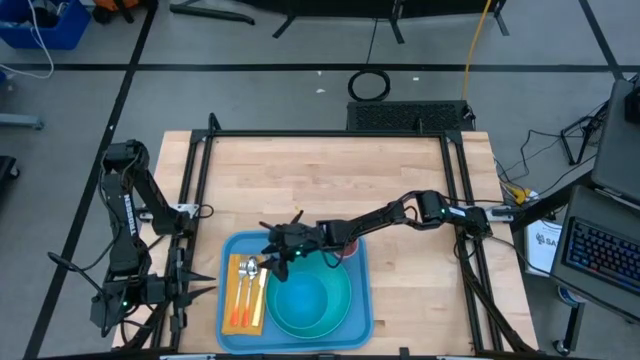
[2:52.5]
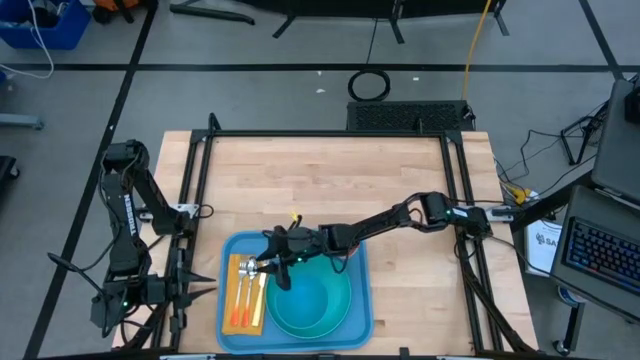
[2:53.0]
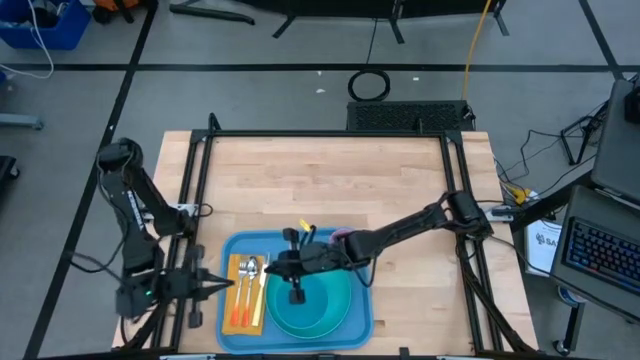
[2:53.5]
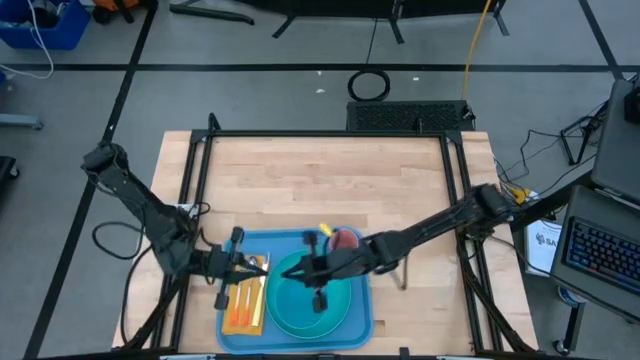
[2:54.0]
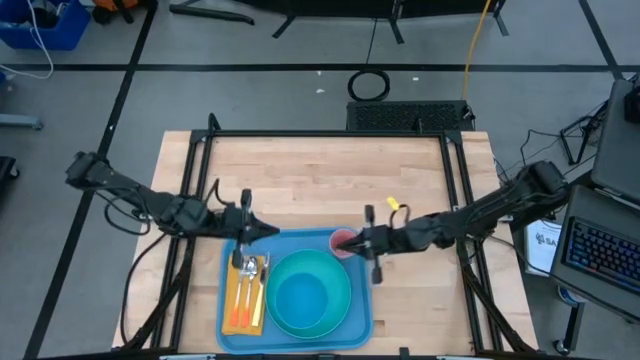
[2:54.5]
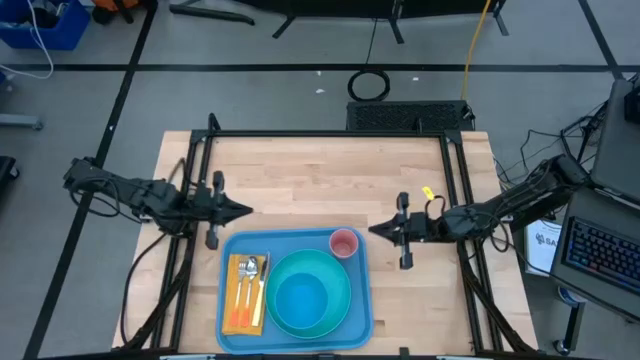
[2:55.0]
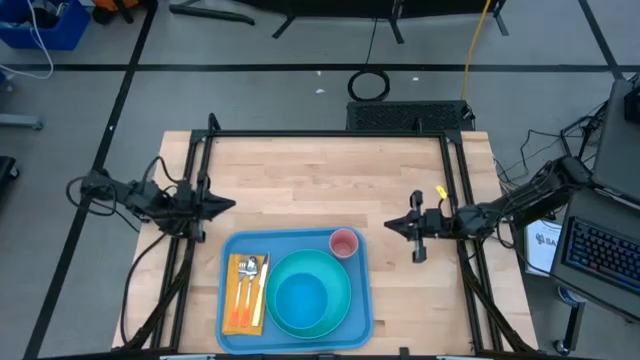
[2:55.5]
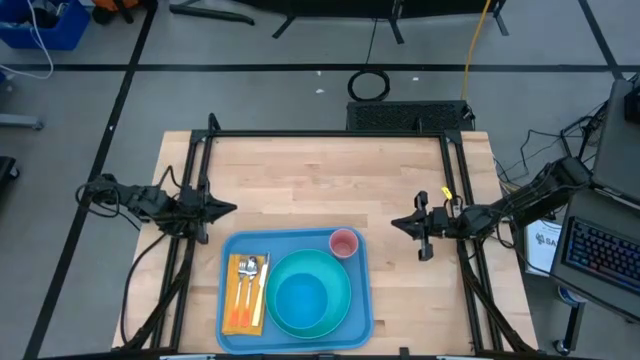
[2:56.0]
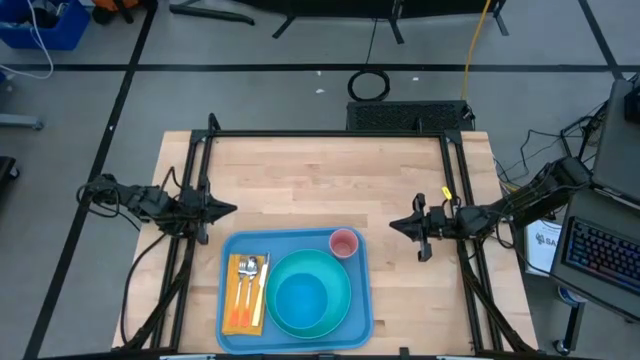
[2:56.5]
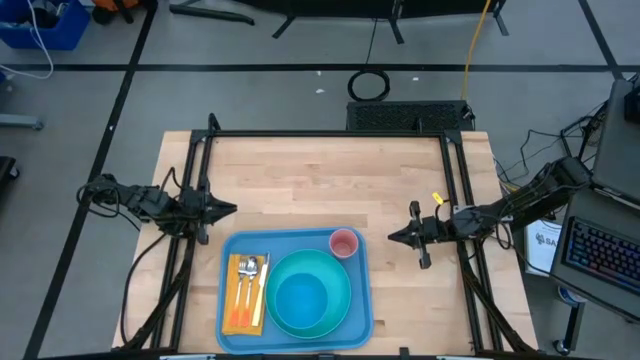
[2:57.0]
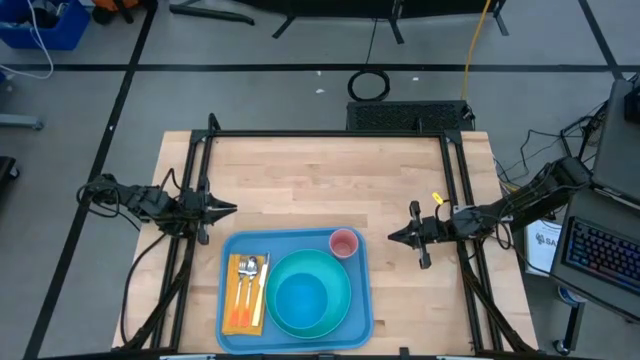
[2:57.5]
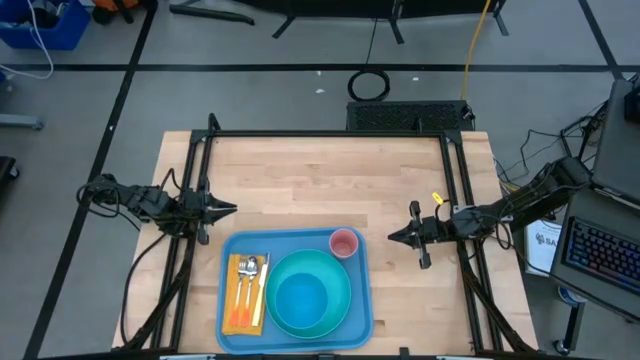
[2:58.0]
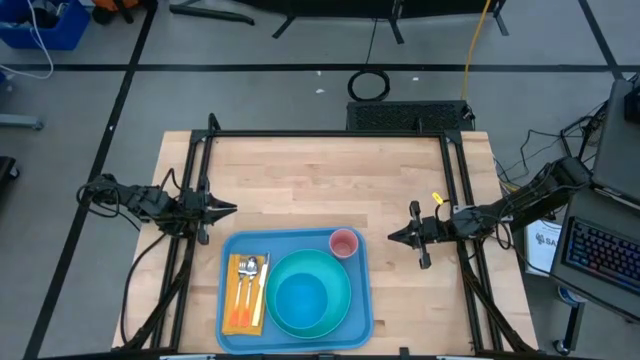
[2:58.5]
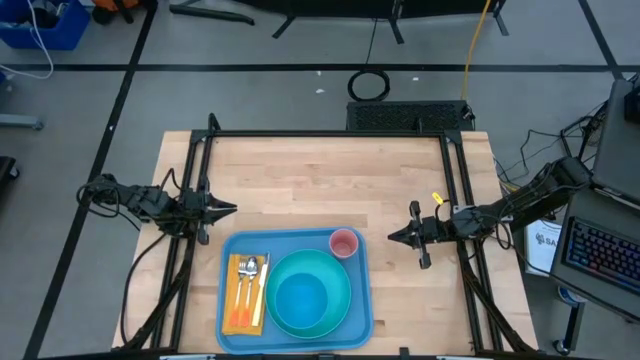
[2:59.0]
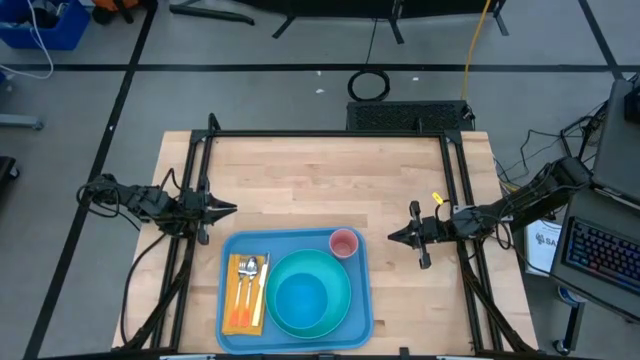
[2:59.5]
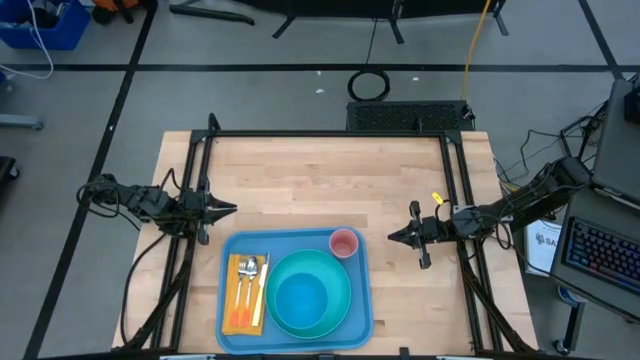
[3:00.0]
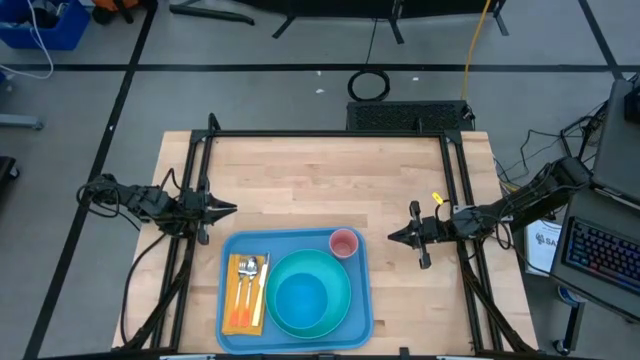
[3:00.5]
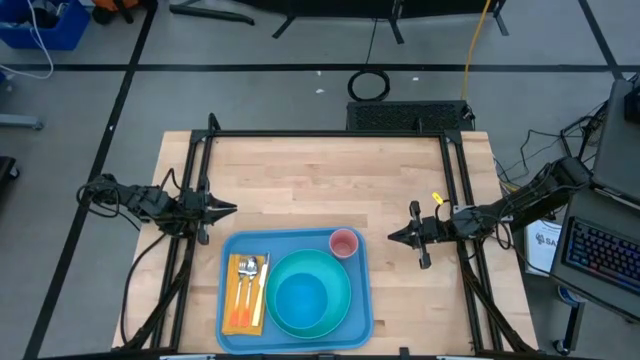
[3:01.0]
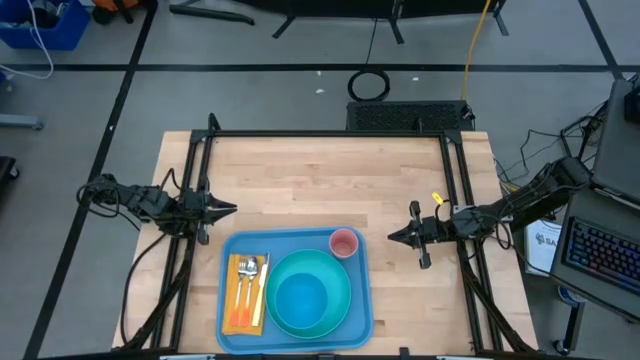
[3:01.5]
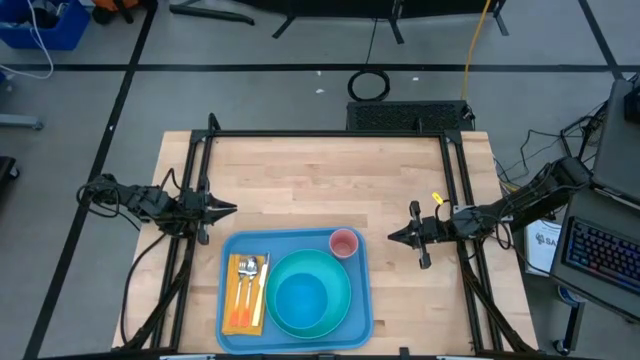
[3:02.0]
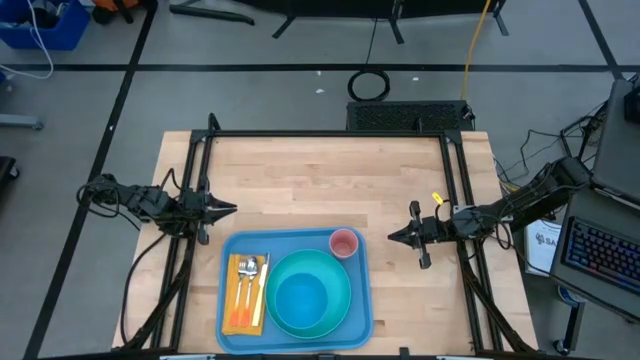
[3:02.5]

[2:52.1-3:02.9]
Task: Set up tray
Return to Home Position

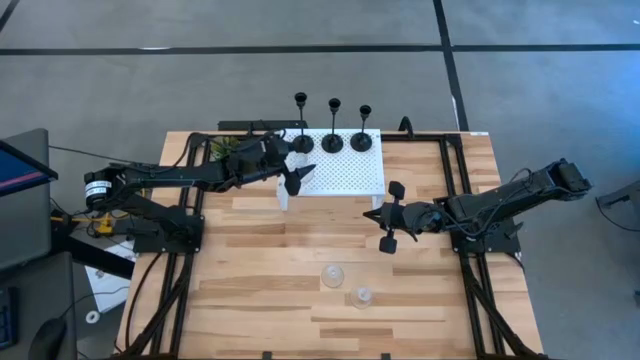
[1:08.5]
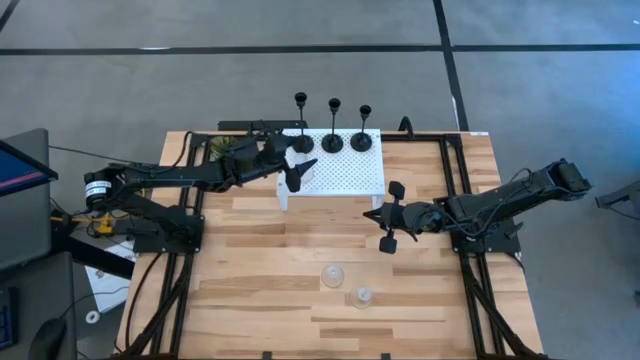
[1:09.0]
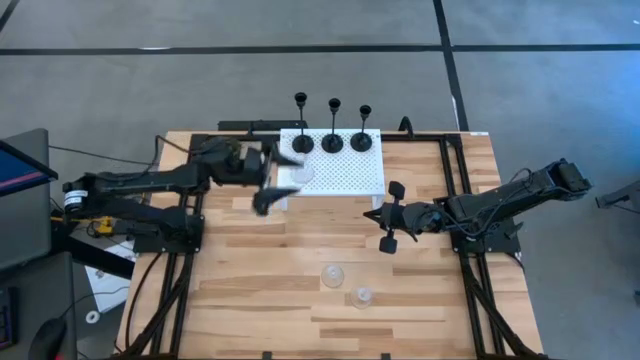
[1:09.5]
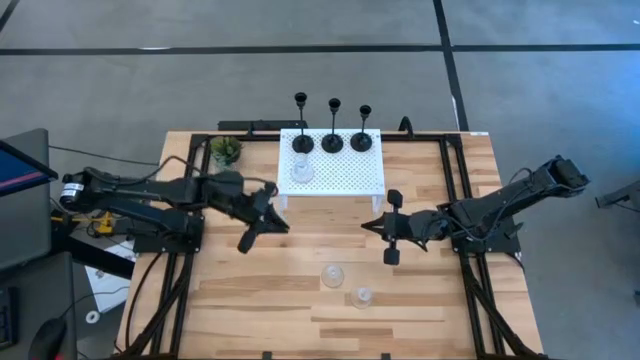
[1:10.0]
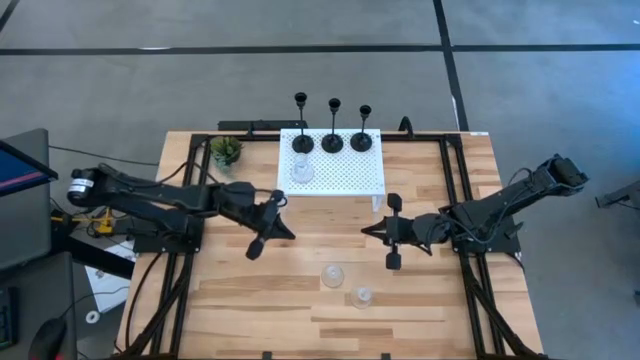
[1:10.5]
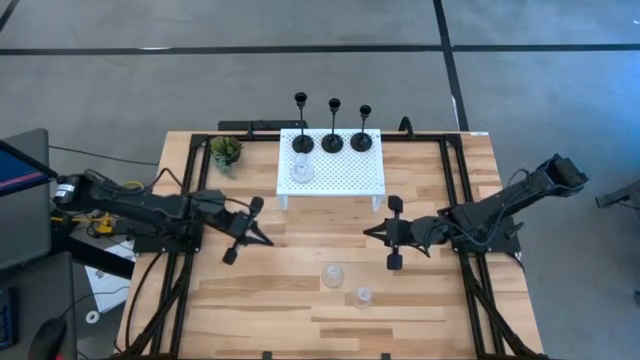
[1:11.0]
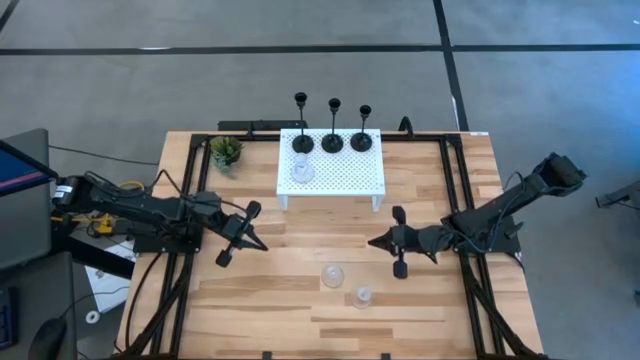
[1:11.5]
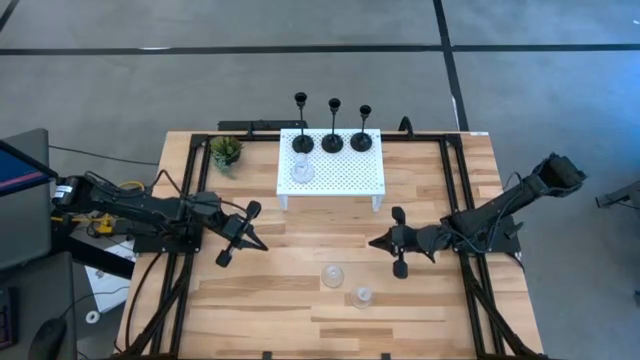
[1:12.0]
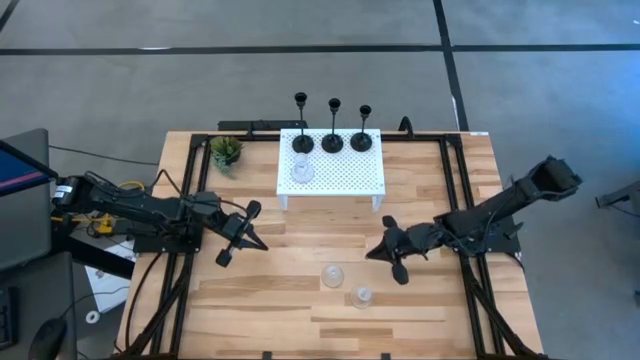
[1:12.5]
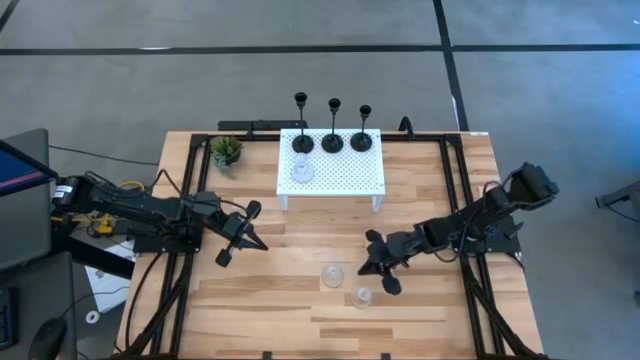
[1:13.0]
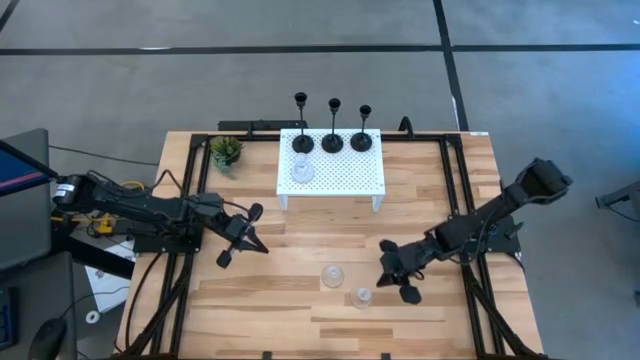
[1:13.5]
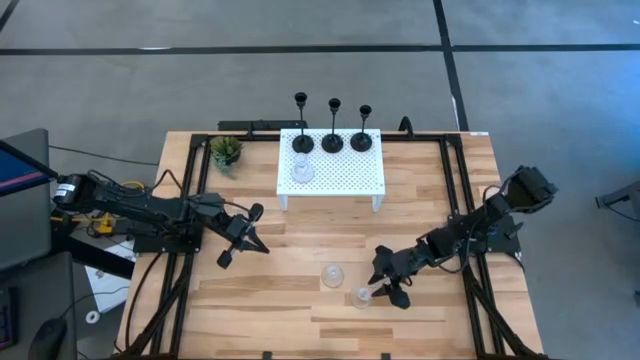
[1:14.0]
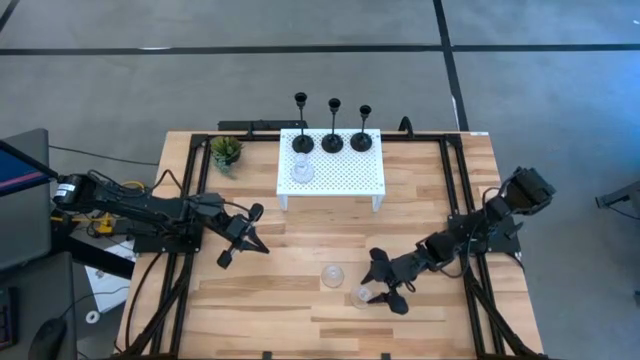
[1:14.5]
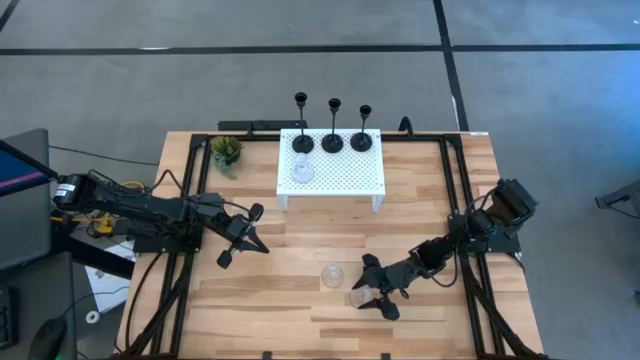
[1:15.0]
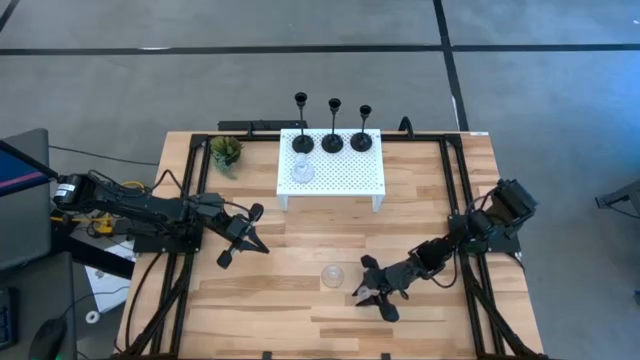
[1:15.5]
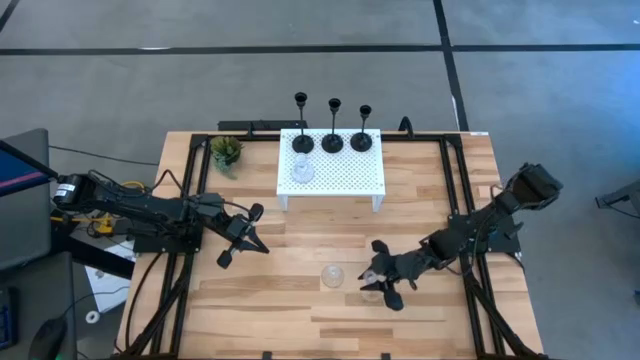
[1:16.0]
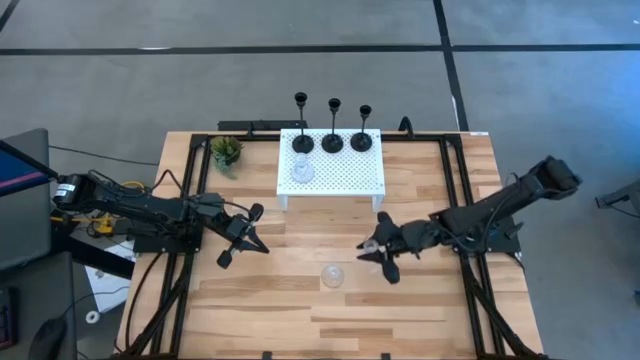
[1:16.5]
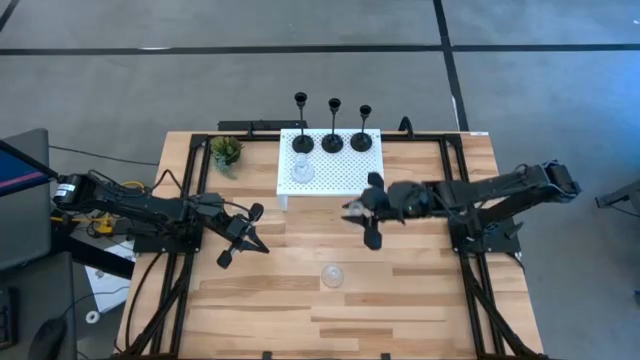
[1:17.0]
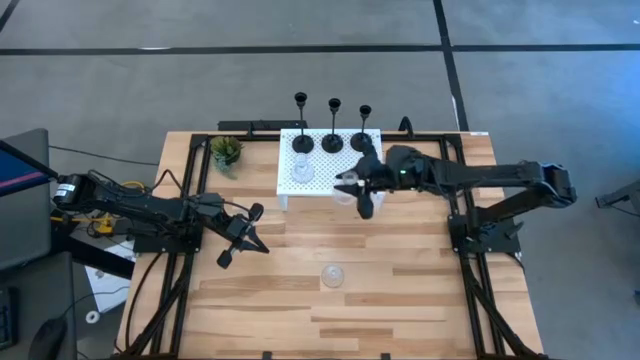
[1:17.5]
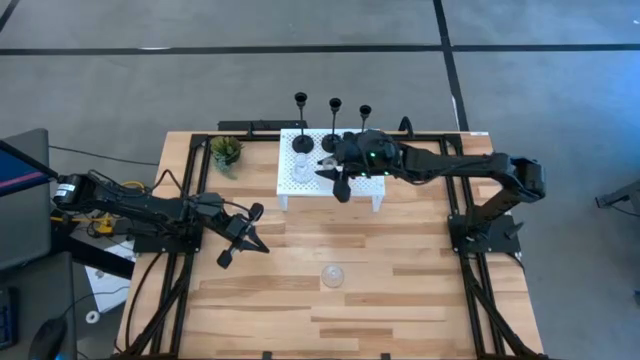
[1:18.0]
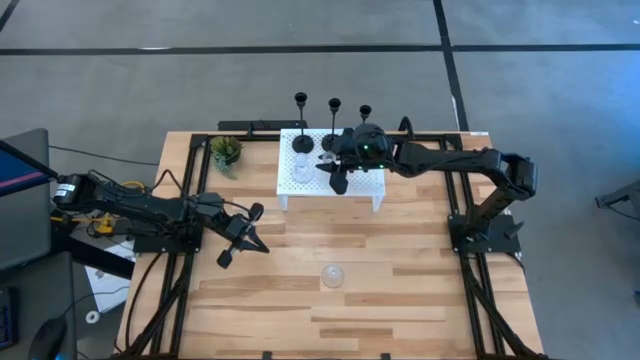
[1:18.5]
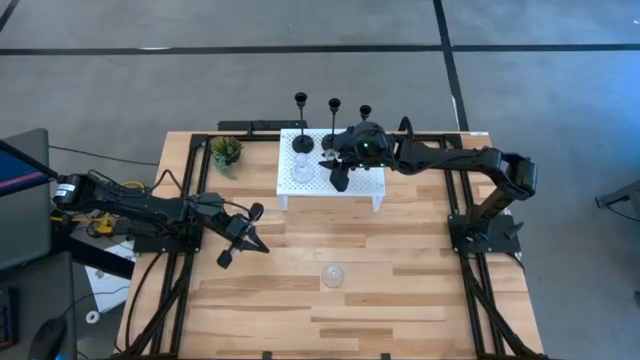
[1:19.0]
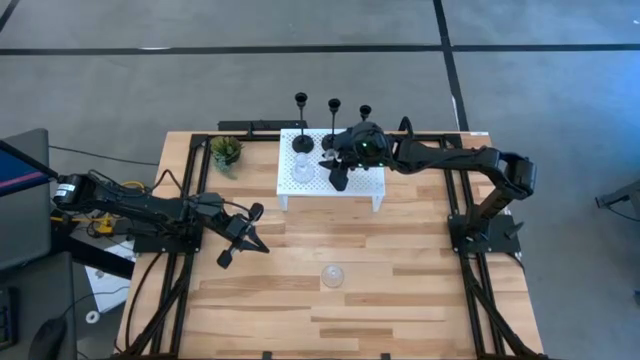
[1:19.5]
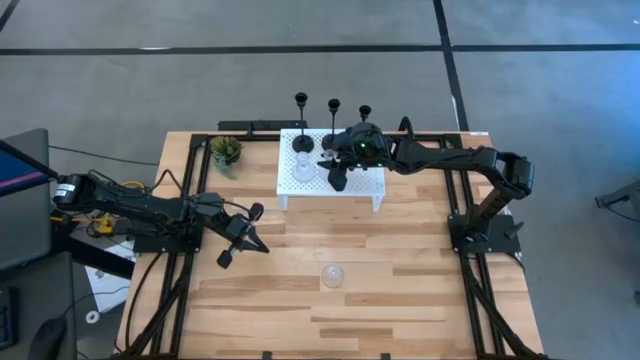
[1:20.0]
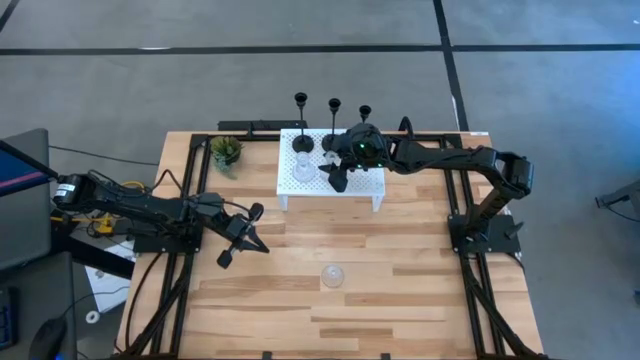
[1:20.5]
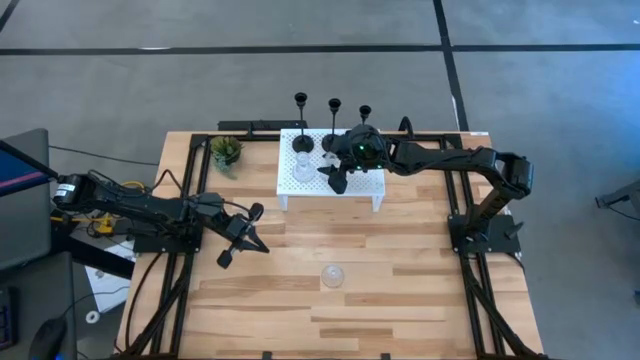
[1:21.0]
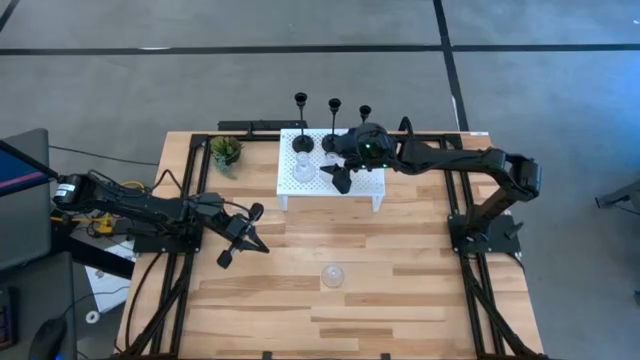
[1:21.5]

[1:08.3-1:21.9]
Task: Pick & Place candle stick holders
Put the bottom transparent candle holder on the shelf
